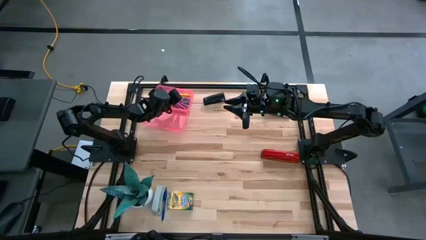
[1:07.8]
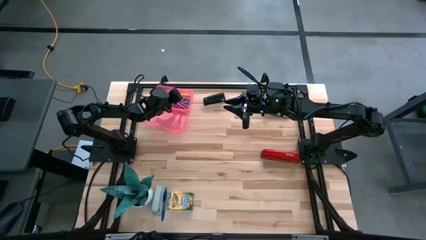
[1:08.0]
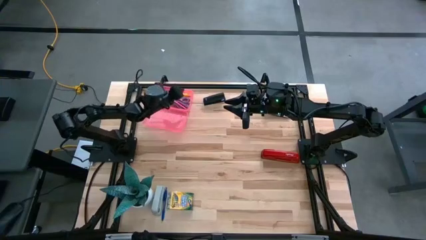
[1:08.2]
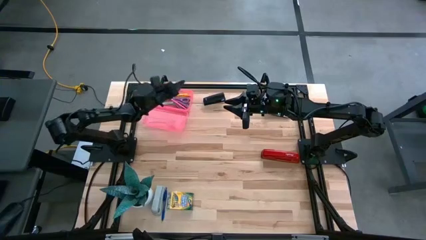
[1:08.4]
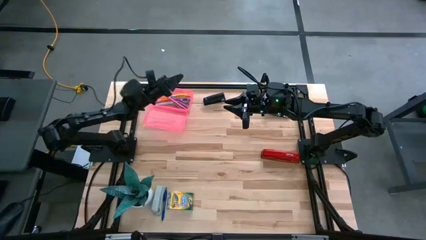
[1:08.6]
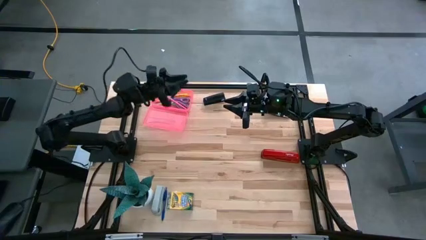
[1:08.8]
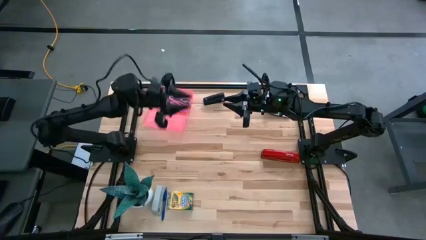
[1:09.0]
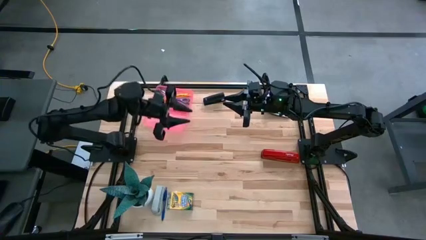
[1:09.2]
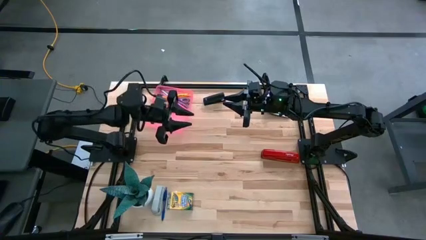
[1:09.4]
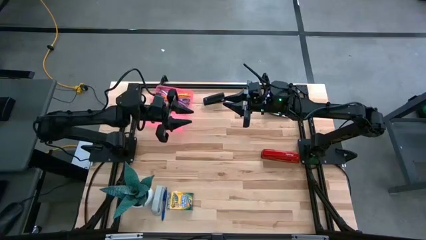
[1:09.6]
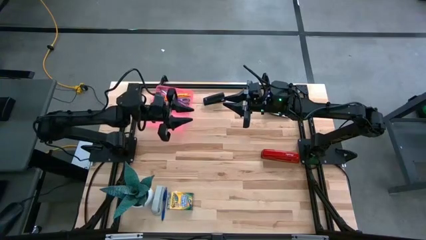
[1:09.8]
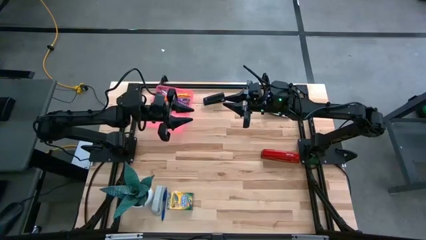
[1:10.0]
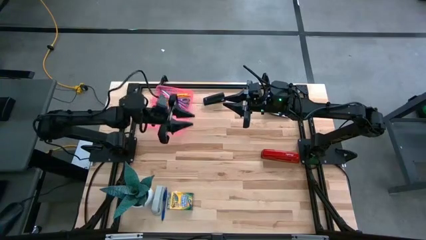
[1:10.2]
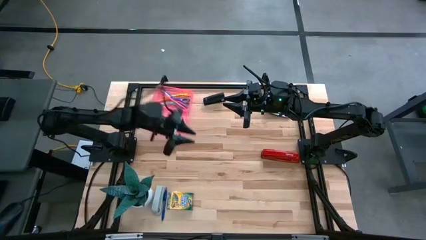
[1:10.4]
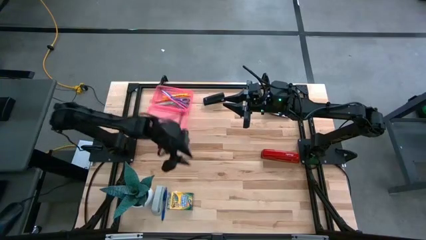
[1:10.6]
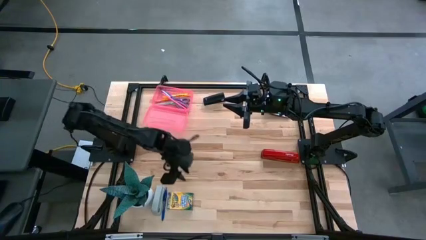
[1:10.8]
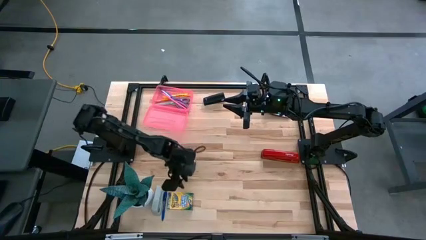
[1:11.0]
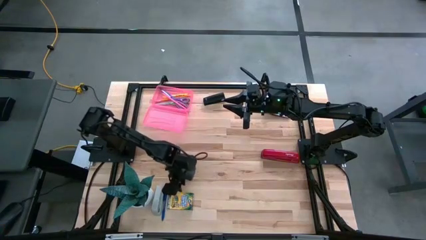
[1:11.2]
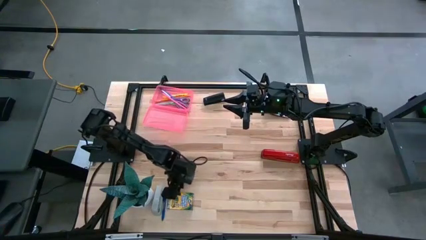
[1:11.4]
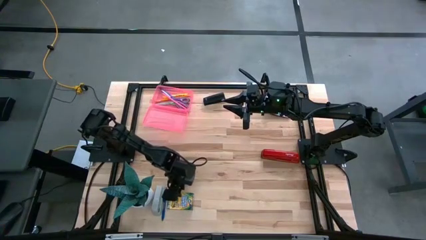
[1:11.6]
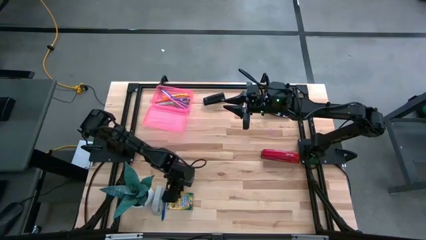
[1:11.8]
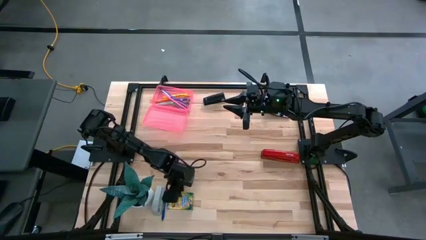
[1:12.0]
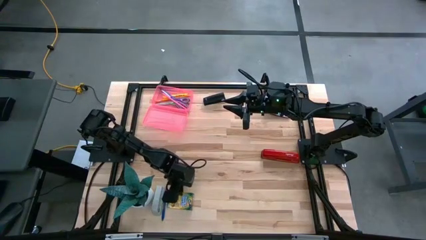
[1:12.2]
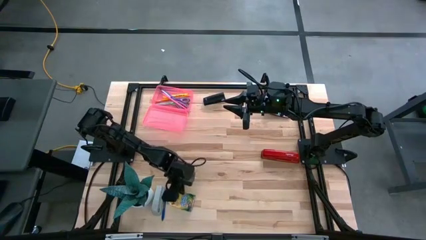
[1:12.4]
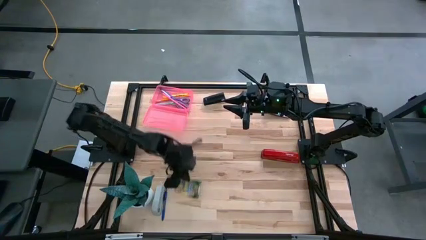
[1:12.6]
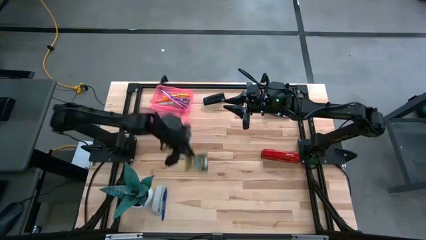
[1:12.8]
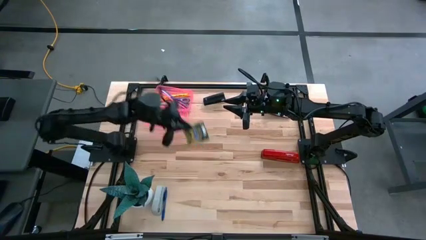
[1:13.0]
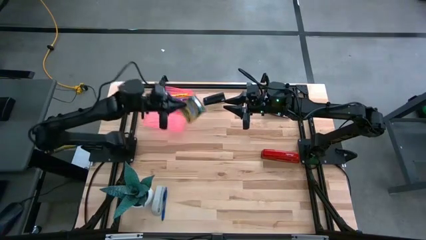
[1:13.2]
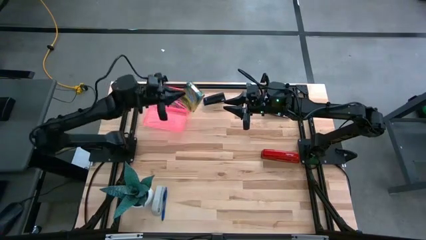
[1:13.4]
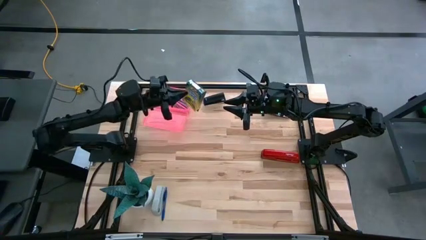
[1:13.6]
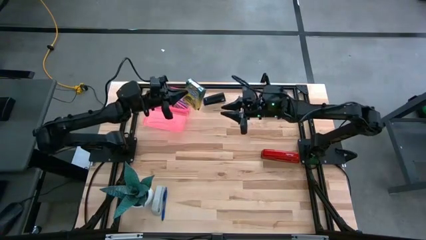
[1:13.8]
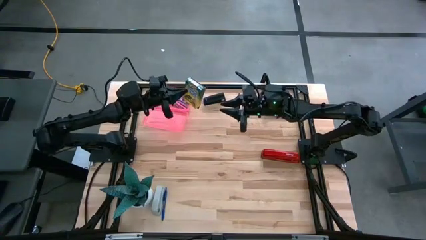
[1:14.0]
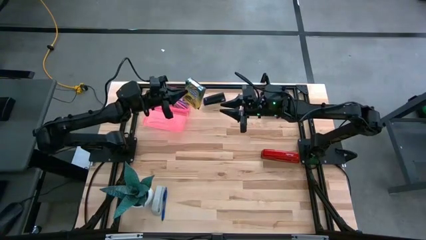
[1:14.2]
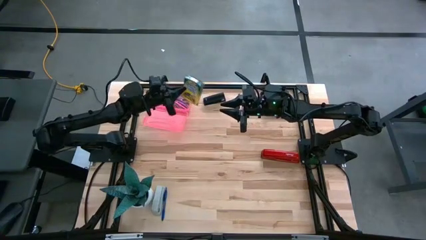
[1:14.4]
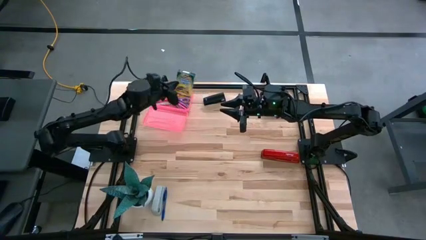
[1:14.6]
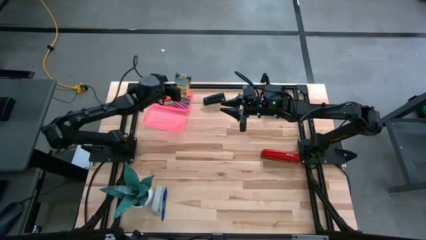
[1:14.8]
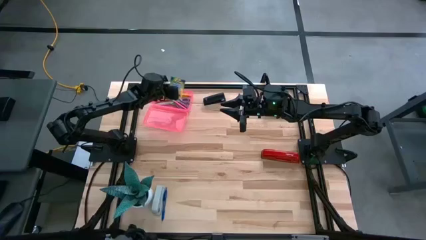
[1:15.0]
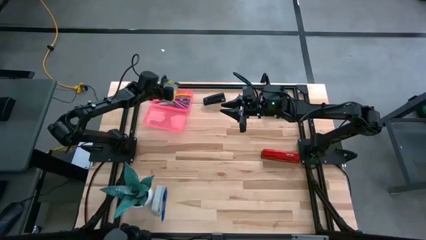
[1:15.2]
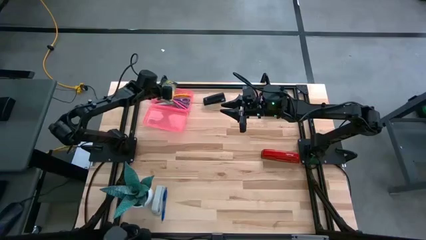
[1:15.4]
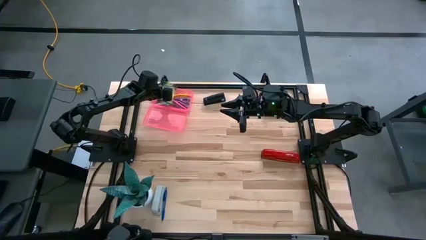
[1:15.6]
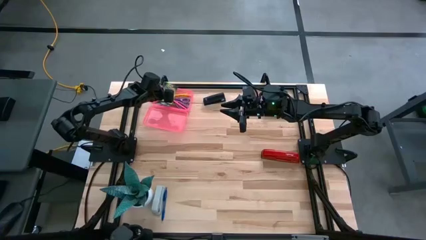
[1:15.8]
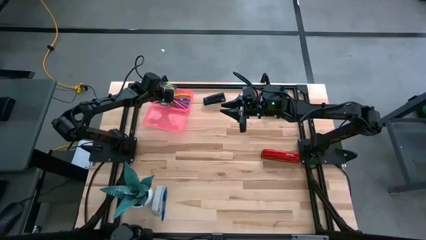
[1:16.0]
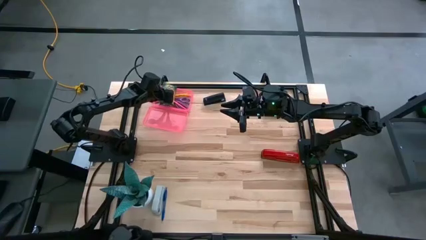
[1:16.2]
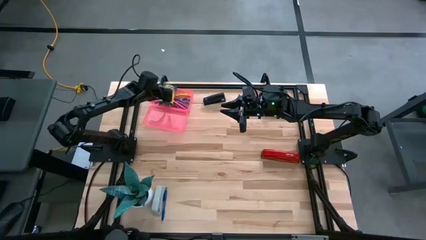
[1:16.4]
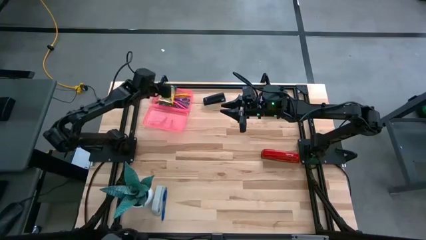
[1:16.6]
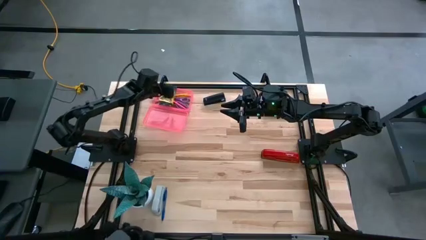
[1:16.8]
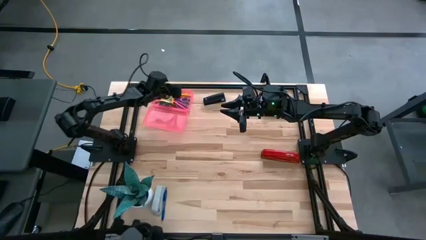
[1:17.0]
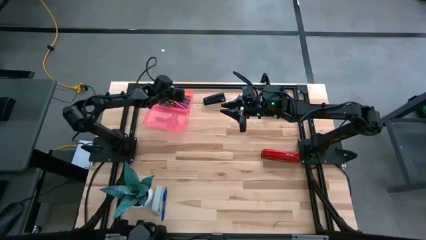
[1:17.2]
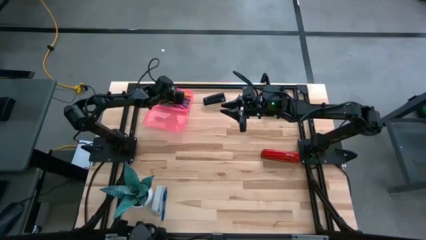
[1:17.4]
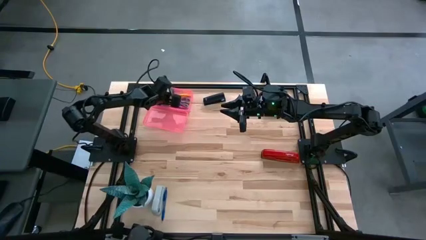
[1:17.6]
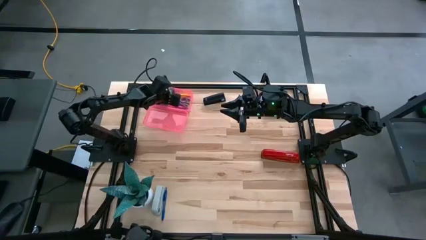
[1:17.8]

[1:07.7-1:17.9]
Task: Pack school essentials
Put the yellow crayon pack into the pink supply box

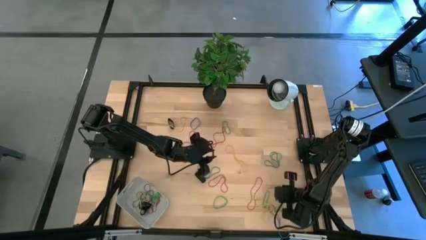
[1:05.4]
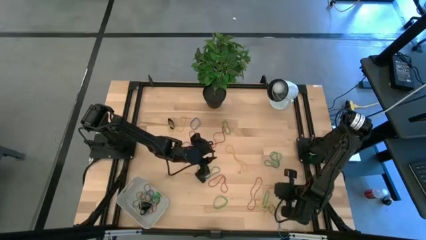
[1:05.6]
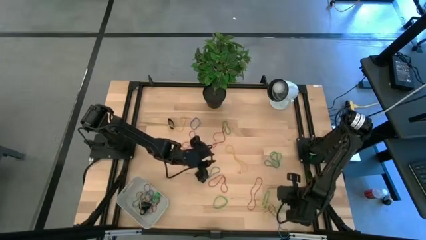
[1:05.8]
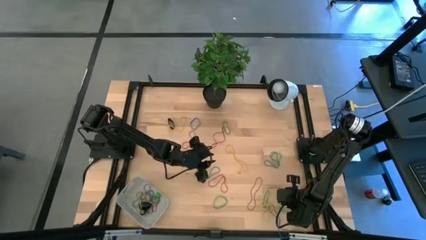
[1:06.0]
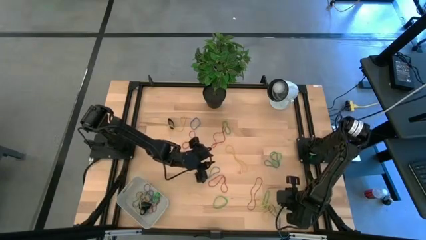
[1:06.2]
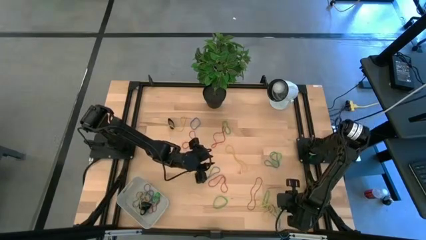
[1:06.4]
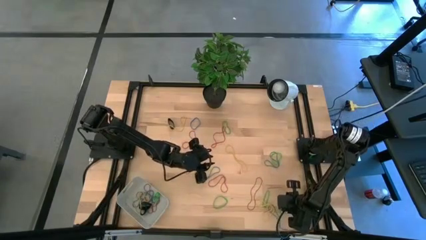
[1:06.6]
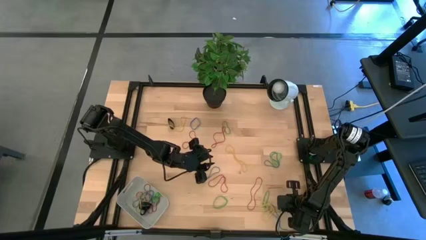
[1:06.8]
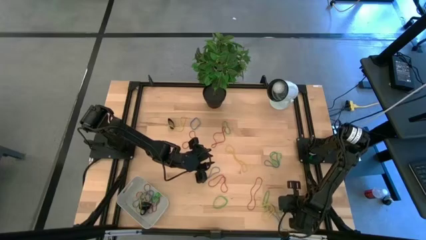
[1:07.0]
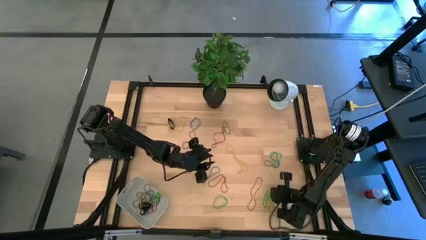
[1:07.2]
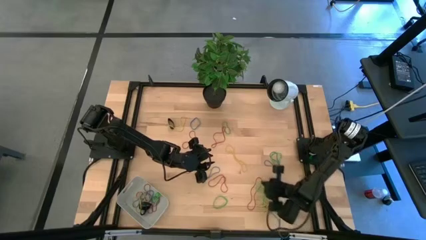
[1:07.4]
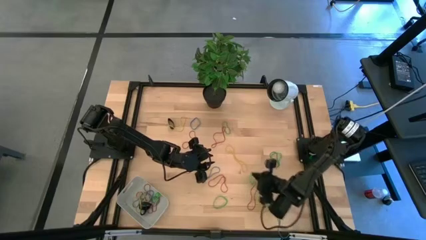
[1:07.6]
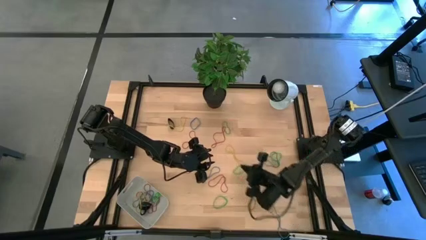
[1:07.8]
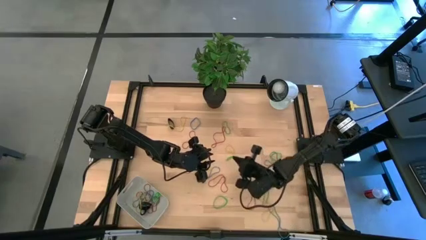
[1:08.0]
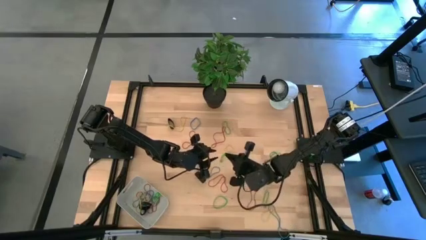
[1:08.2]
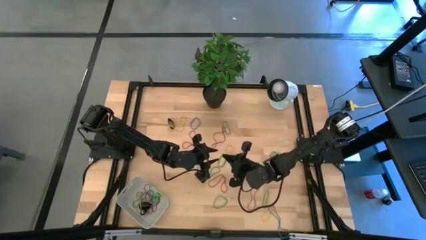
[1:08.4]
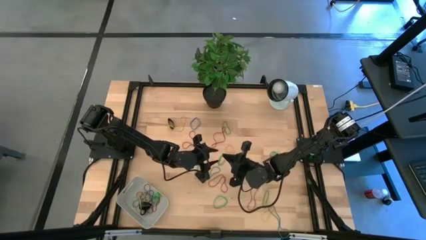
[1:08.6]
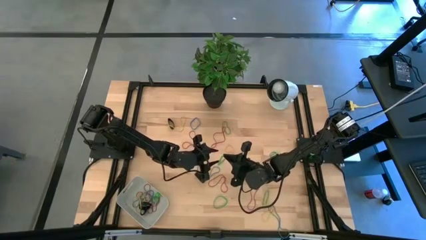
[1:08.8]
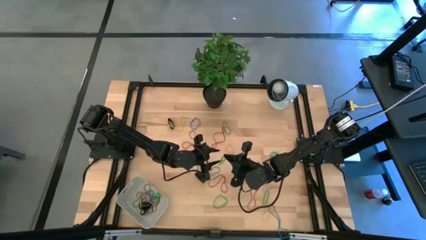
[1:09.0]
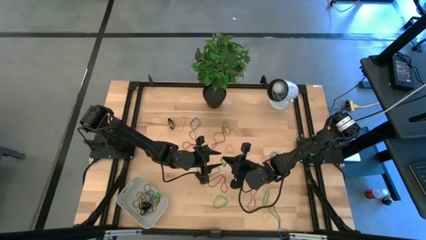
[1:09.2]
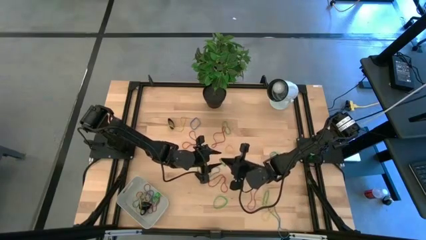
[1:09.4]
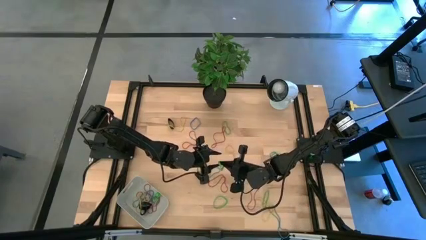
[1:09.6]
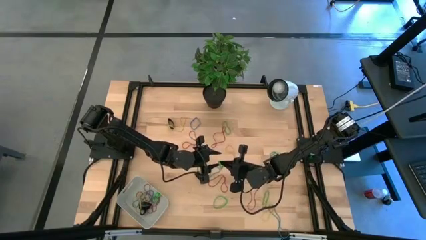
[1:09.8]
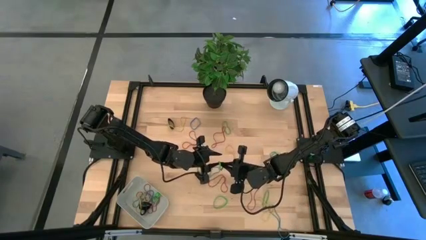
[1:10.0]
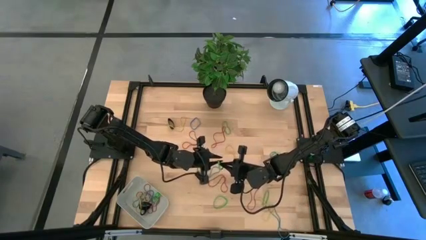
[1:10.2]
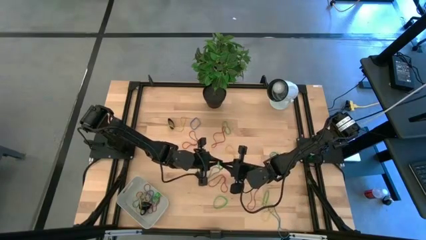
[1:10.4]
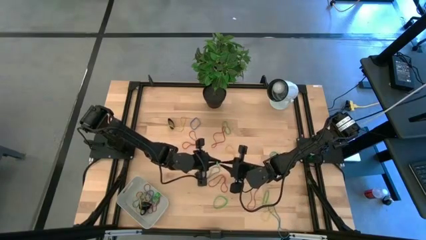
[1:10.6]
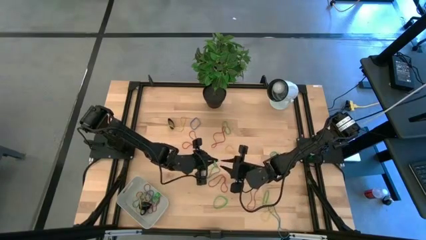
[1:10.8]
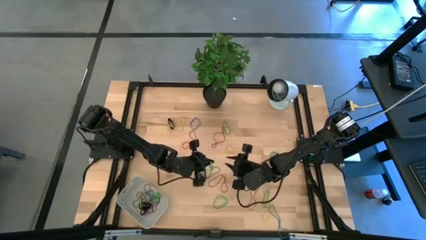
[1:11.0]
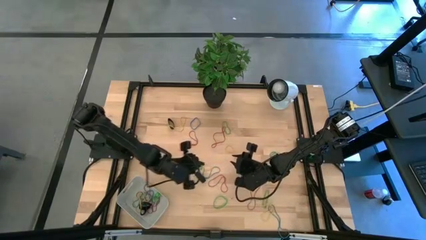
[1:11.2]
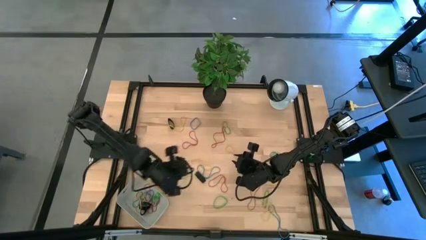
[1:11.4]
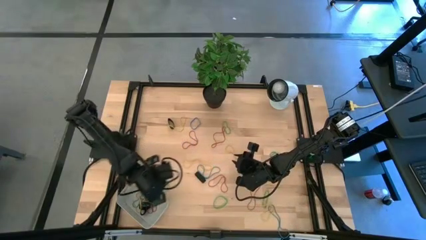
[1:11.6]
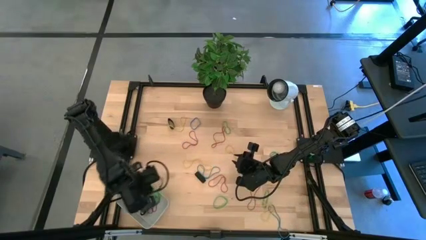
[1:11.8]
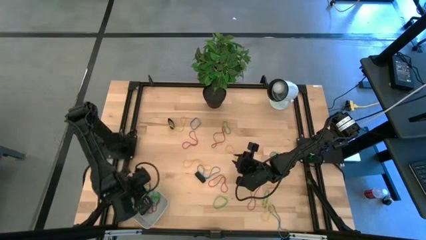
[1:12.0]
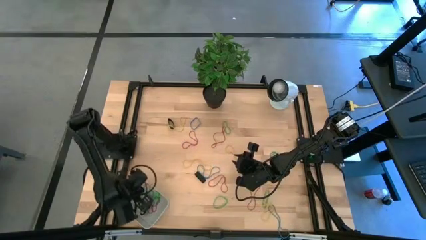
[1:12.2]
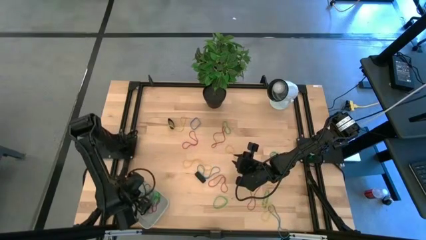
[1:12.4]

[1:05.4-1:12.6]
Task: Pick and place rubber bands into bin
Put the green rubber band into the gray bin
